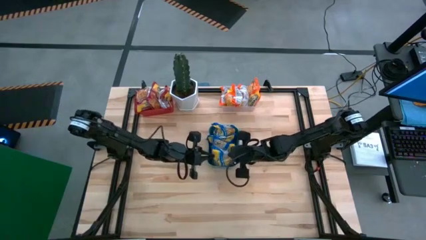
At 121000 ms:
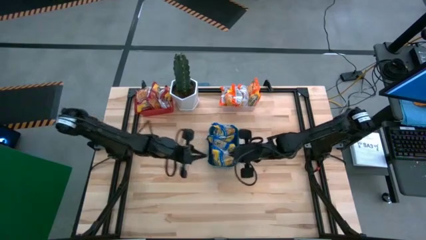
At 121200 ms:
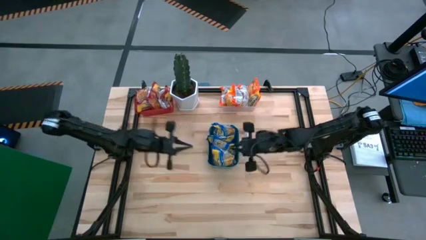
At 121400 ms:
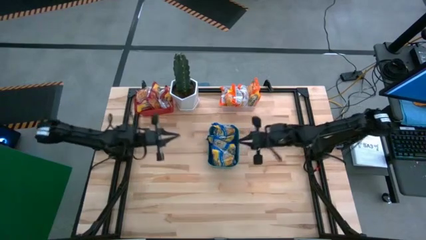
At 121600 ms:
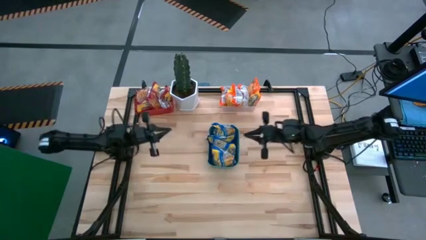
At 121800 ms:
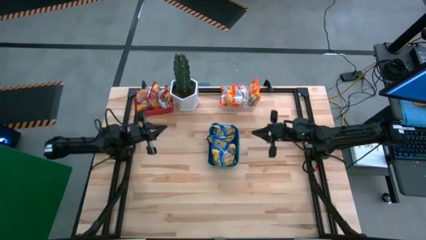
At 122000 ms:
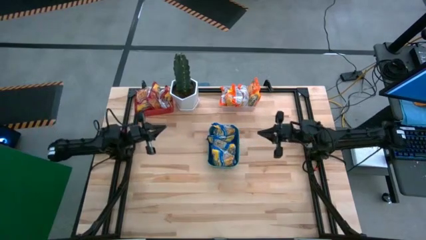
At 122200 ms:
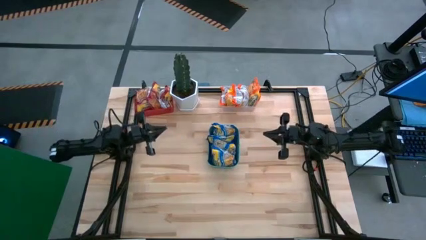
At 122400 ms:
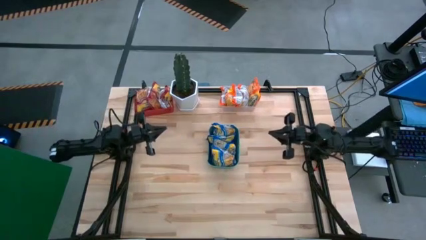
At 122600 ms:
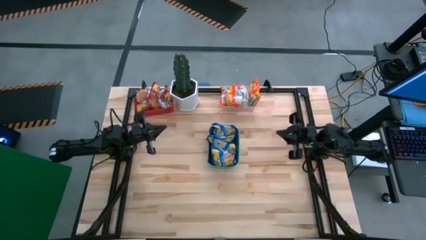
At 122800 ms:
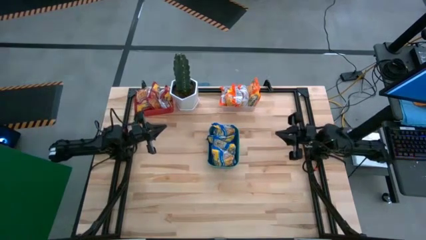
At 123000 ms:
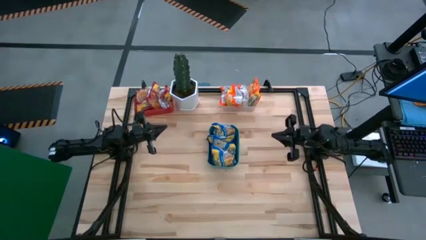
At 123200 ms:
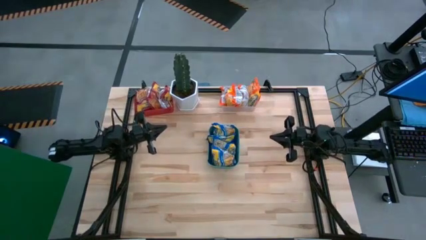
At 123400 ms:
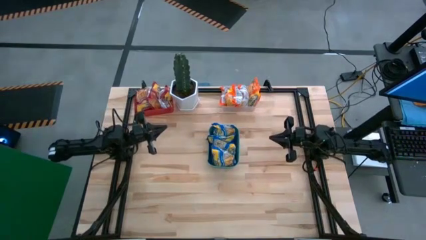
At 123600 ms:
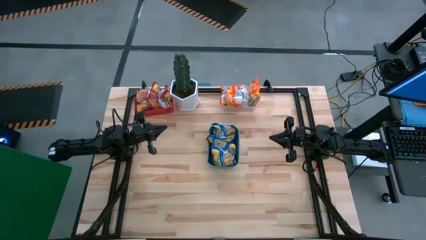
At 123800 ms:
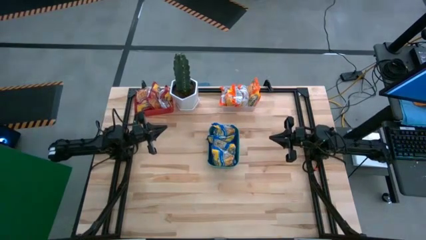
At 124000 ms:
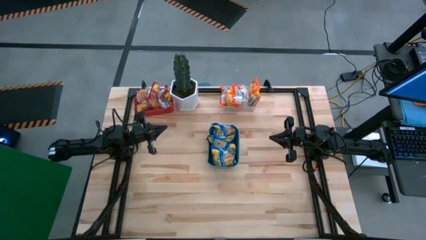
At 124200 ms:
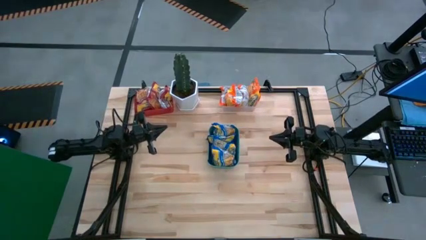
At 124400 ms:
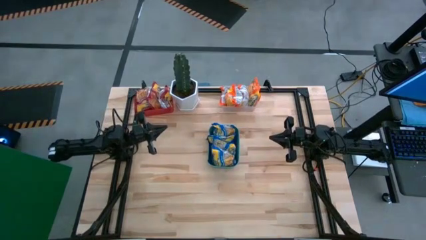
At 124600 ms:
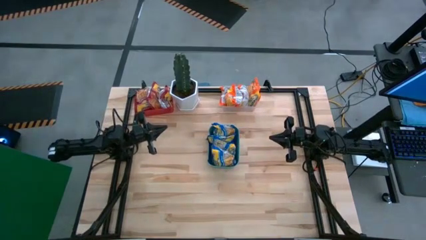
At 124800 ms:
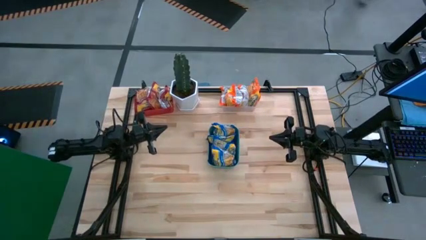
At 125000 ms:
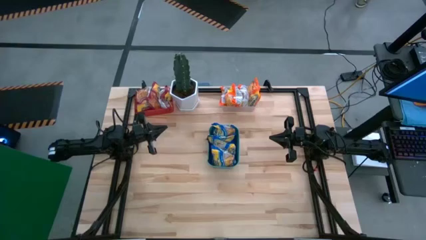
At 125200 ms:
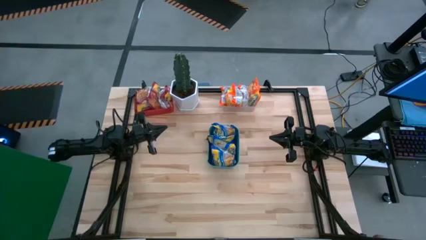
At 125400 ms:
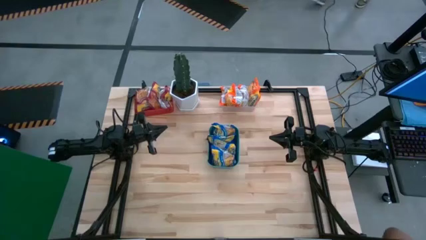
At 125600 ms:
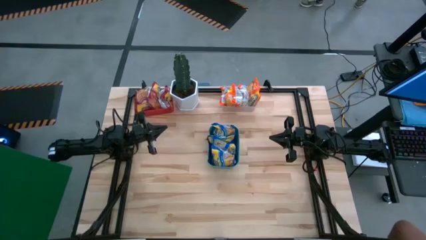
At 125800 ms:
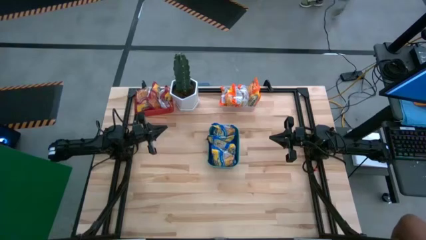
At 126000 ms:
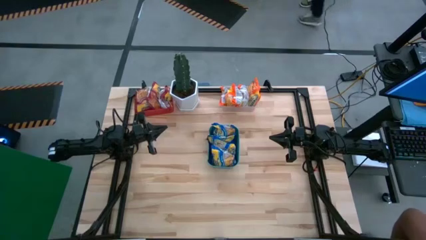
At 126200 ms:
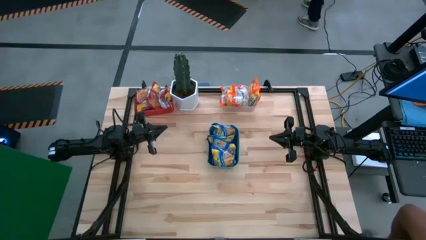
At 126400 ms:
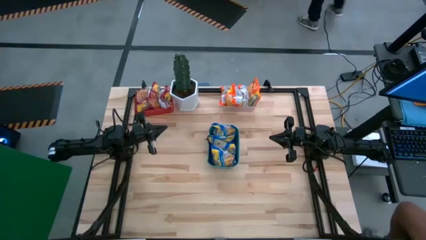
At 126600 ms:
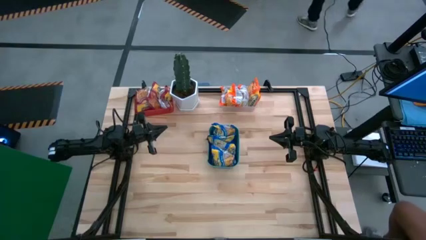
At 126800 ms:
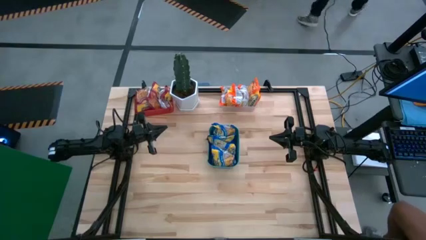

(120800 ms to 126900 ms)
Task: Sort Maruchan noodles
Return to Home Position

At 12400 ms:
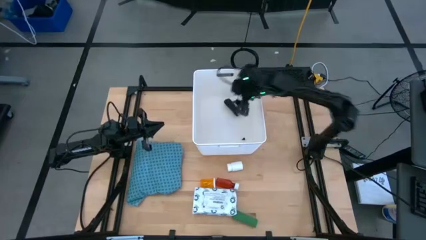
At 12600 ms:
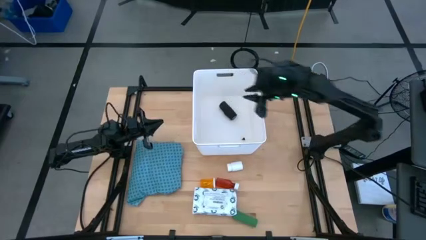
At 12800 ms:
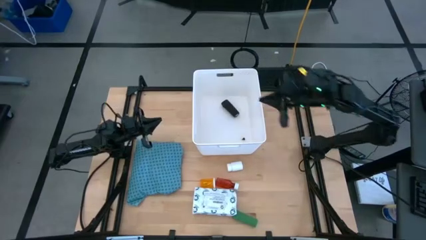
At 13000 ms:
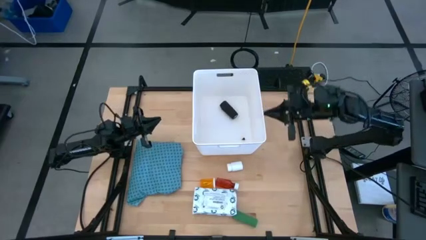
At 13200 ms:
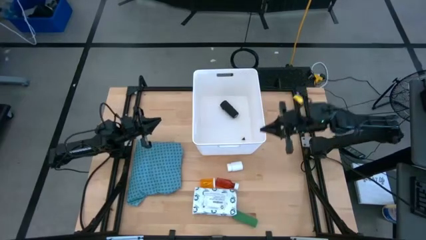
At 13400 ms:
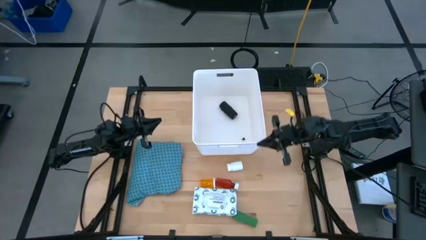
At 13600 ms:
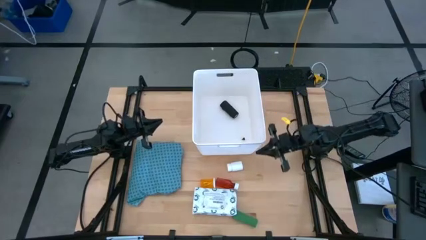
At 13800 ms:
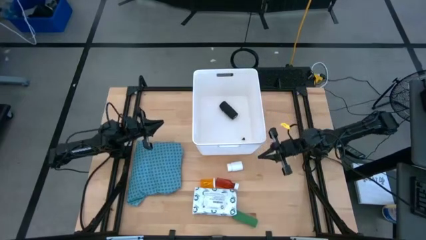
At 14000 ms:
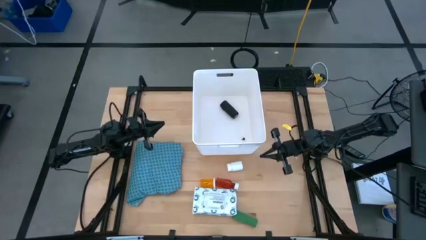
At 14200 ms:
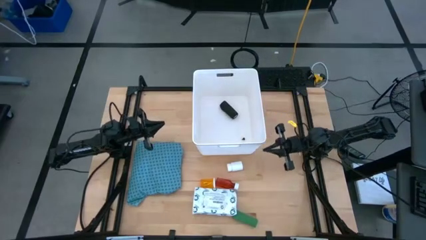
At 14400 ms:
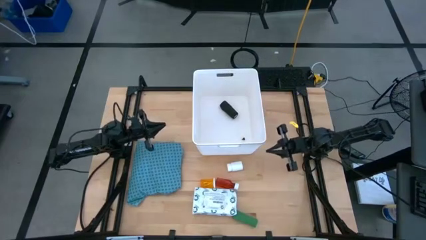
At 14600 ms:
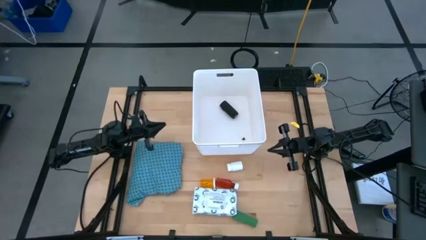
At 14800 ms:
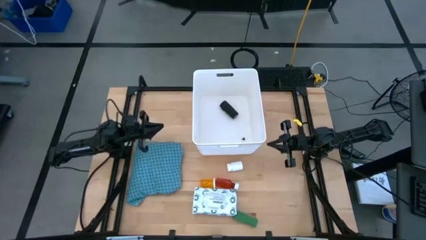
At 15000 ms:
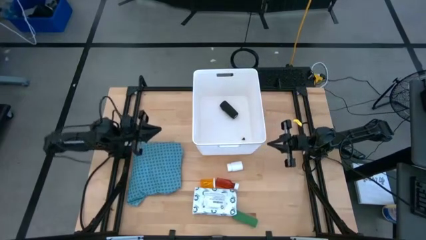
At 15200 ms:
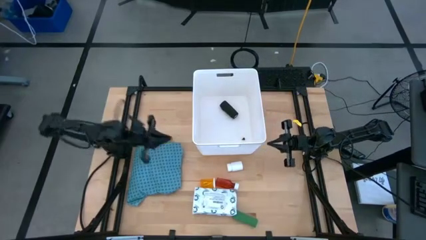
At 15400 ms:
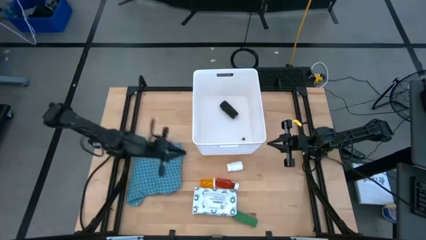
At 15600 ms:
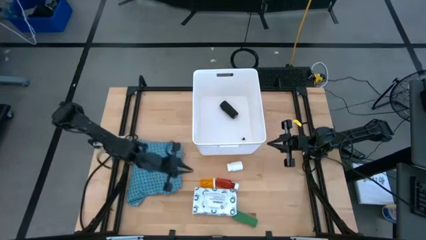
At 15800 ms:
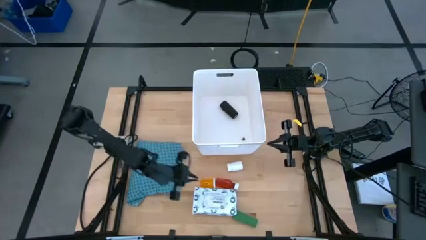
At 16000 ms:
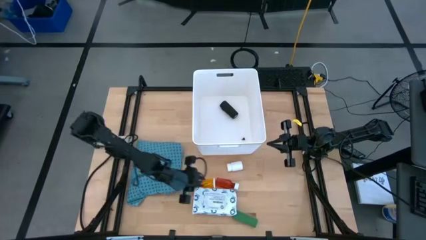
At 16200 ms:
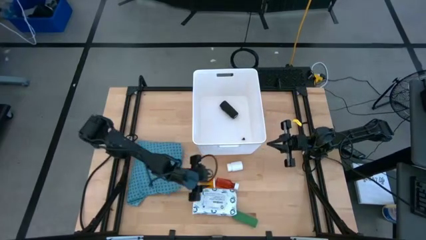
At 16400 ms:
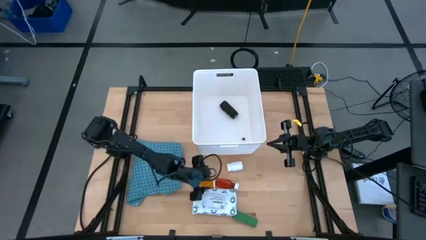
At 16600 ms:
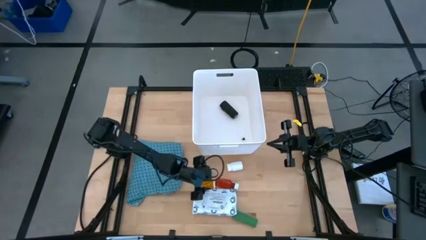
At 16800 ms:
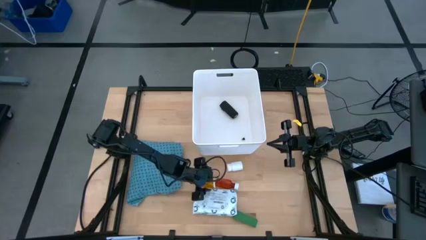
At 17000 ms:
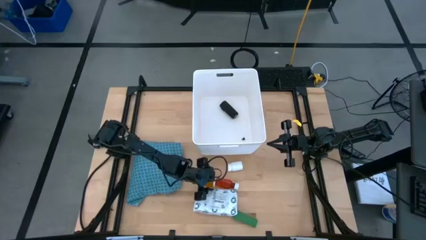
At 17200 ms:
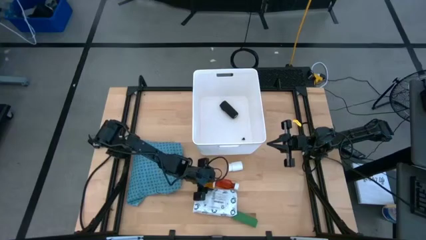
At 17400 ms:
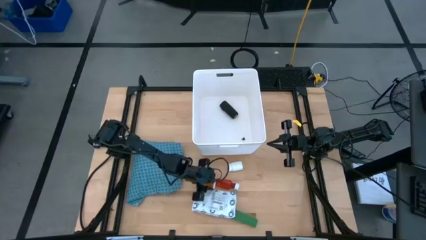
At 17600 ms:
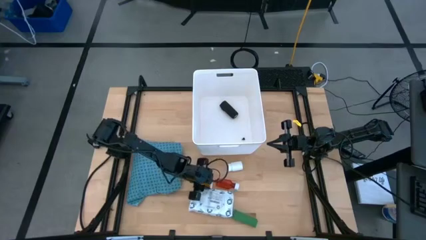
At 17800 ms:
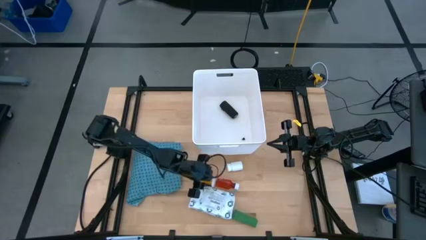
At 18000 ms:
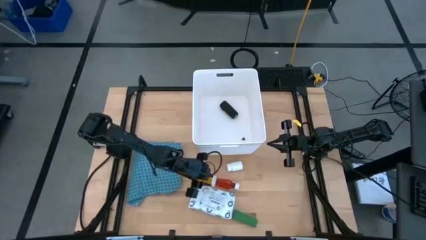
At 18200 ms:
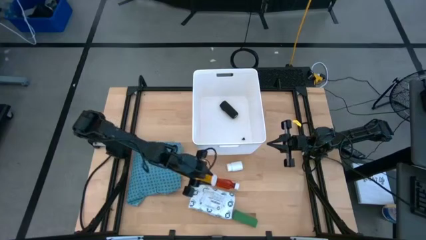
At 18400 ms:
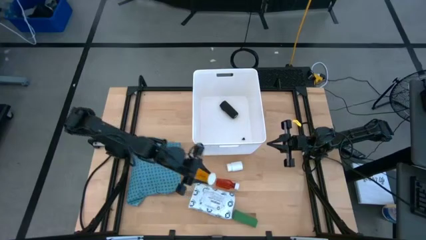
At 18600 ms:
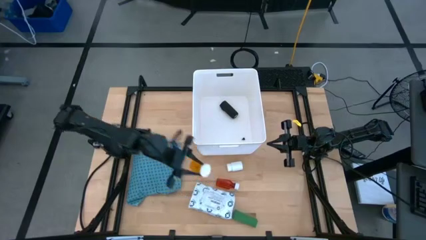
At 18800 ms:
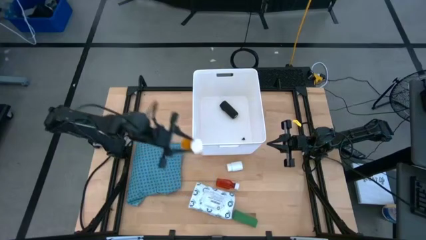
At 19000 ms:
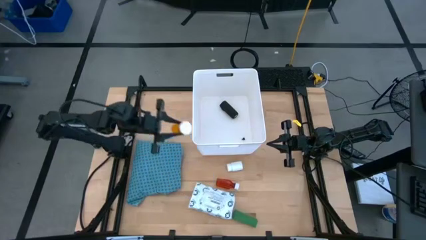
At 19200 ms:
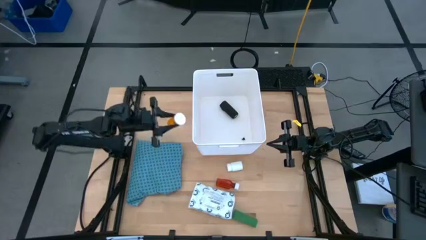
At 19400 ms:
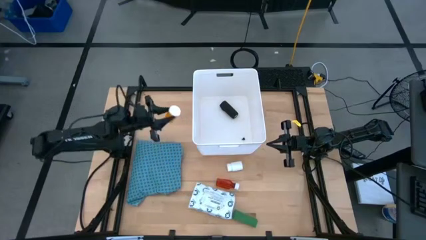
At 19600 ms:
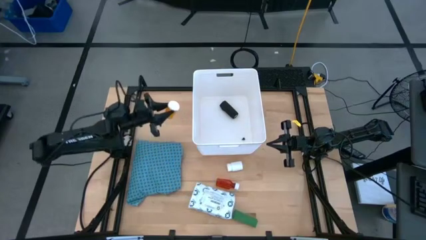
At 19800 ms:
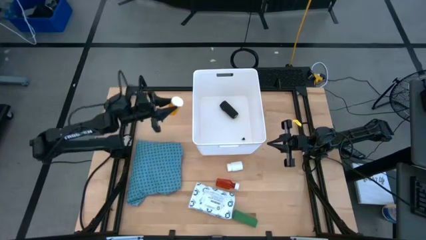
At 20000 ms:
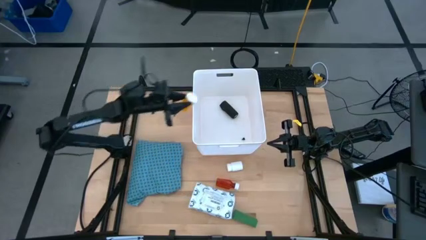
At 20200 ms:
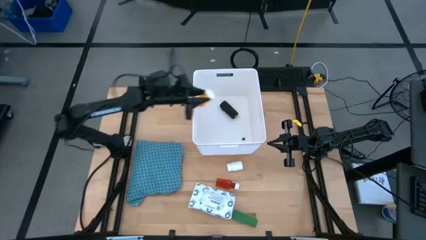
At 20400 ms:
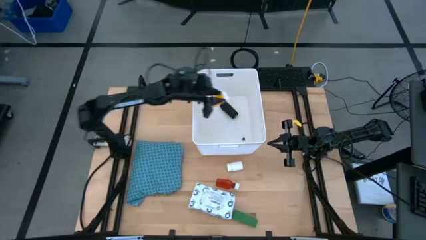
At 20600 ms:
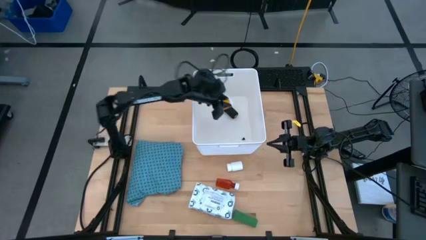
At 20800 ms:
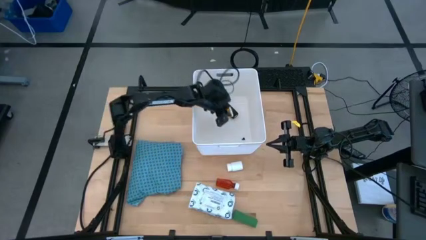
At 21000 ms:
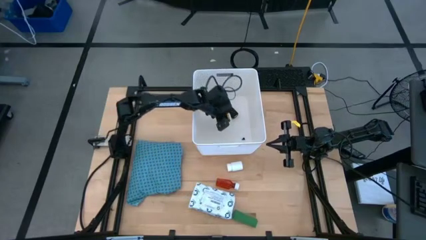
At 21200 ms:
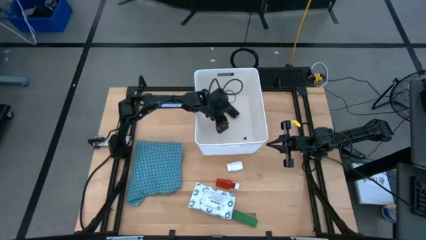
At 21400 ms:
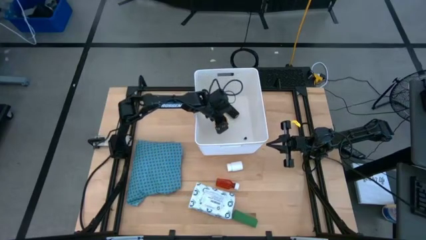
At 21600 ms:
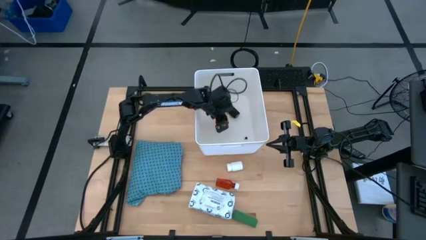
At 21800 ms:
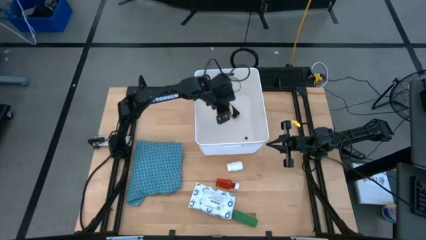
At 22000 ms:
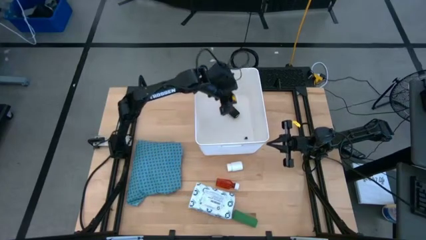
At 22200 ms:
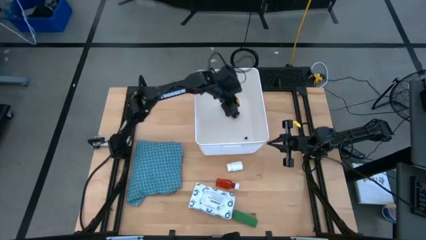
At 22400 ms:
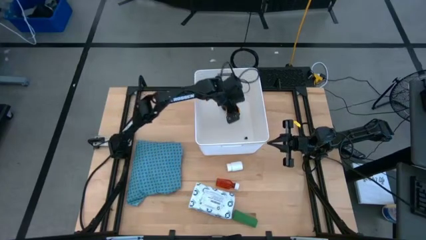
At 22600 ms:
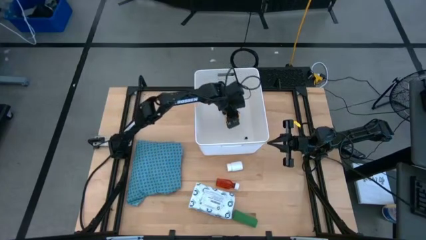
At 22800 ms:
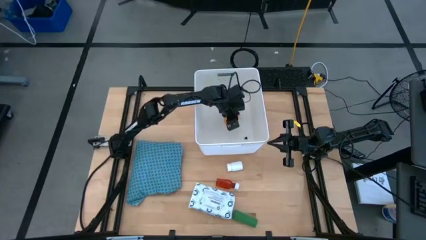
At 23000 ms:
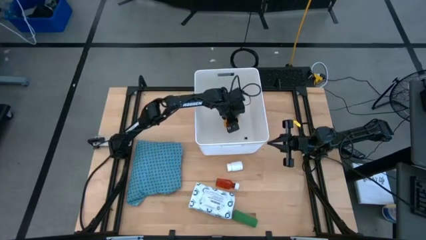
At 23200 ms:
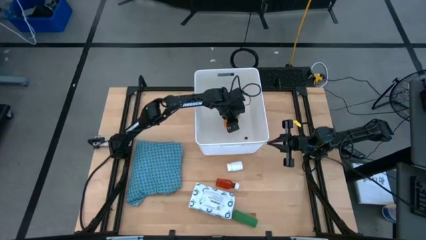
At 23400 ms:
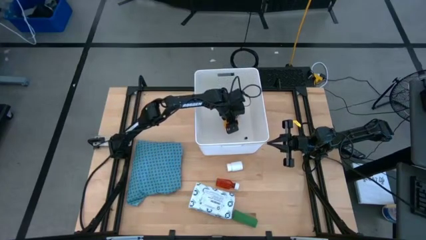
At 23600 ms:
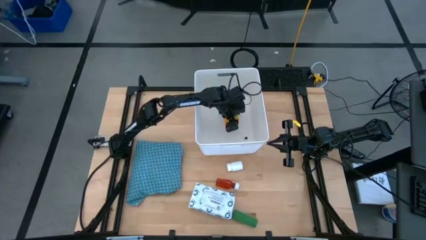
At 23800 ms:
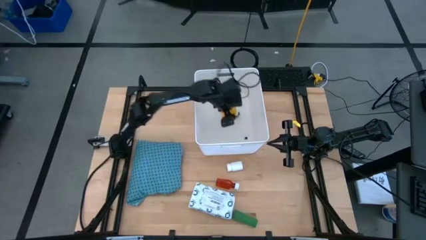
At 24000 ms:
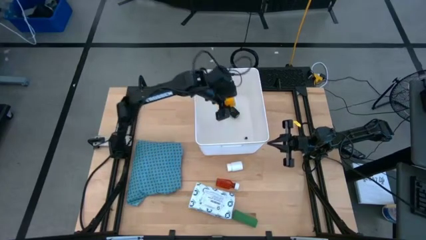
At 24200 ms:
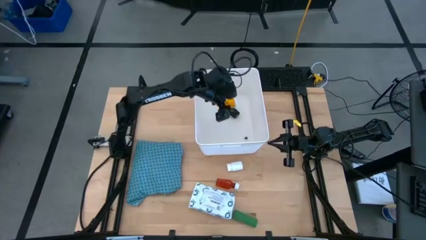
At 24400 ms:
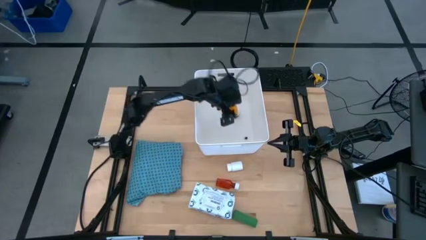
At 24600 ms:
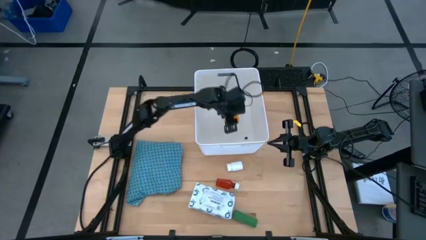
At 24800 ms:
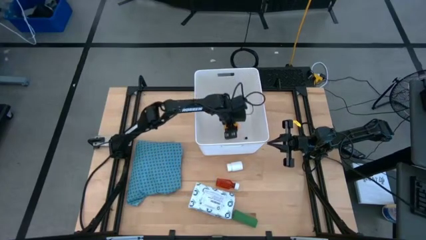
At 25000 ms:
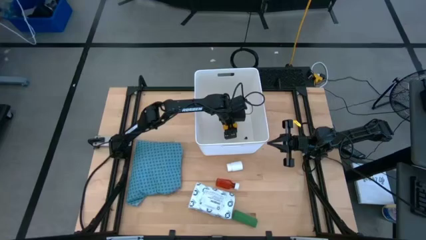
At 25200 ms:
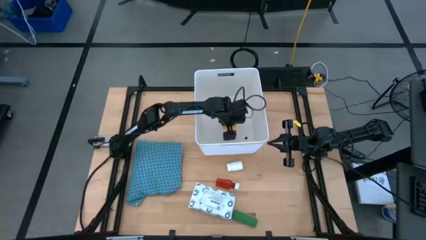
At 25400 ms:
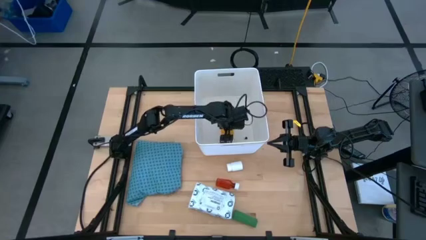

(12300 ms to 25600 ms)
Task: Pick & place medical supplies in basket/bin
Put the yellow pill bottle in the white basket
